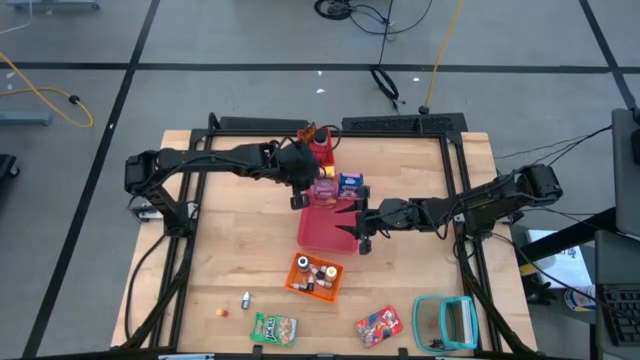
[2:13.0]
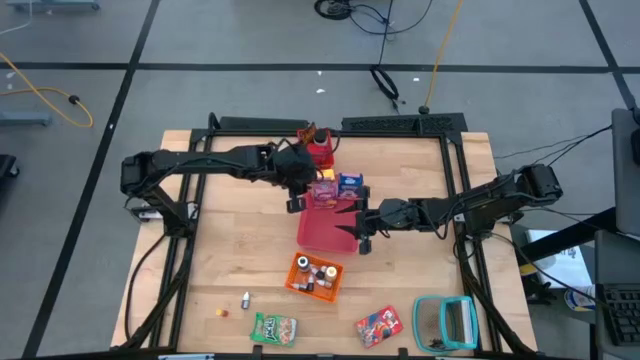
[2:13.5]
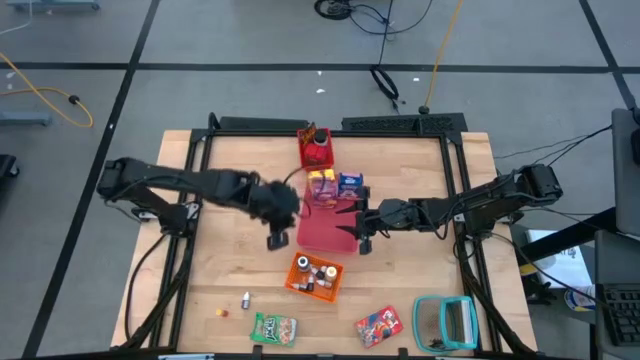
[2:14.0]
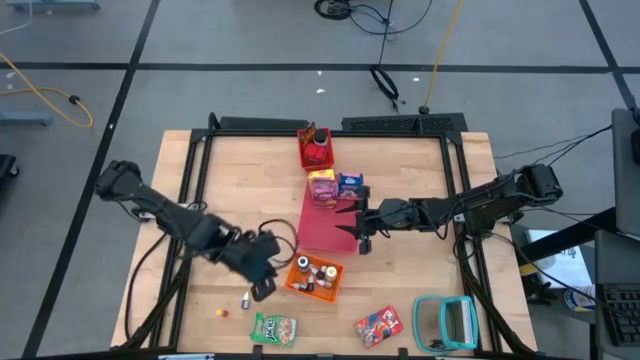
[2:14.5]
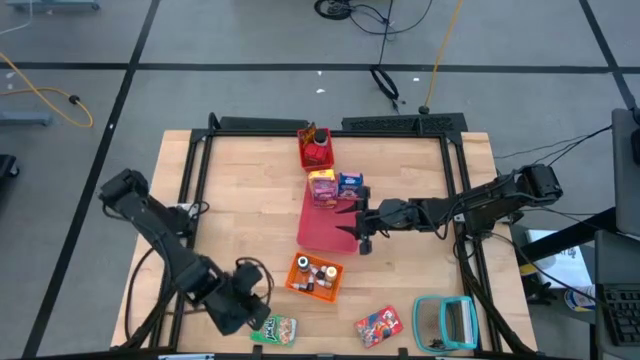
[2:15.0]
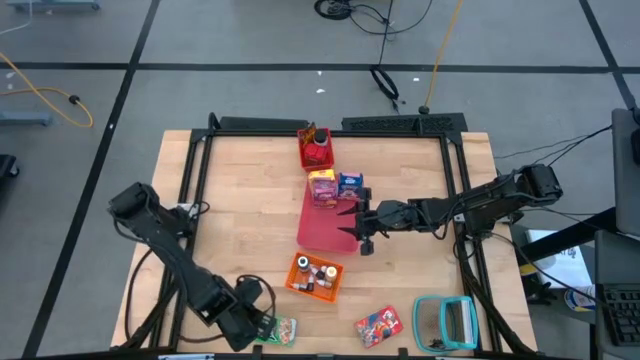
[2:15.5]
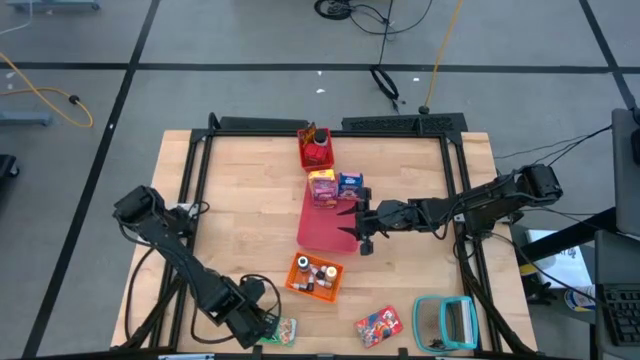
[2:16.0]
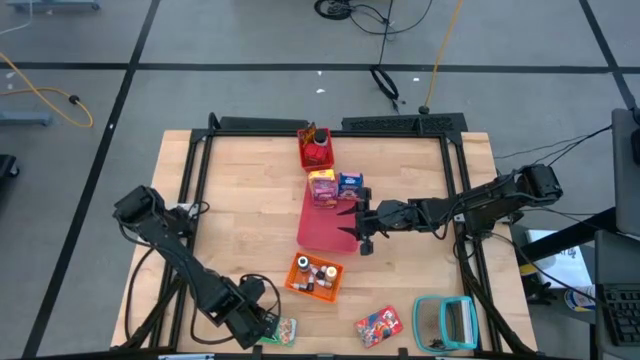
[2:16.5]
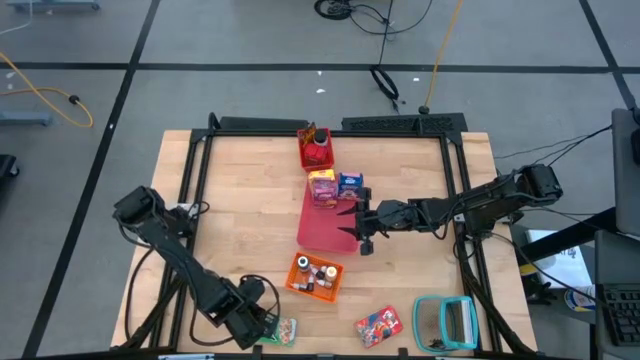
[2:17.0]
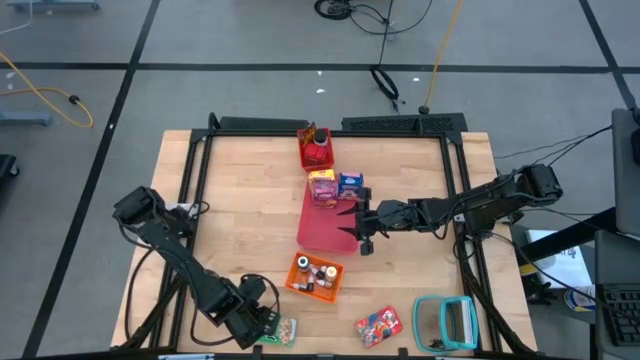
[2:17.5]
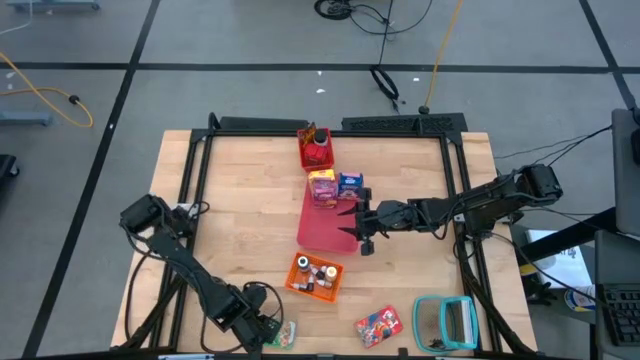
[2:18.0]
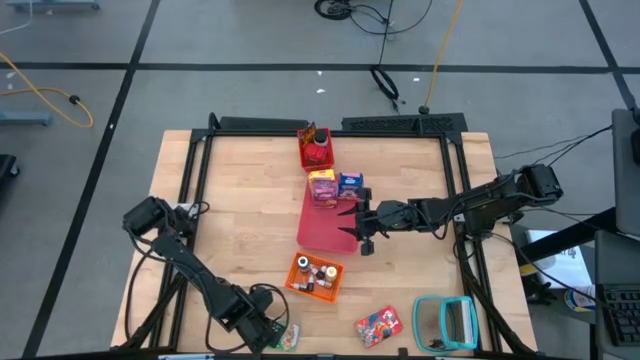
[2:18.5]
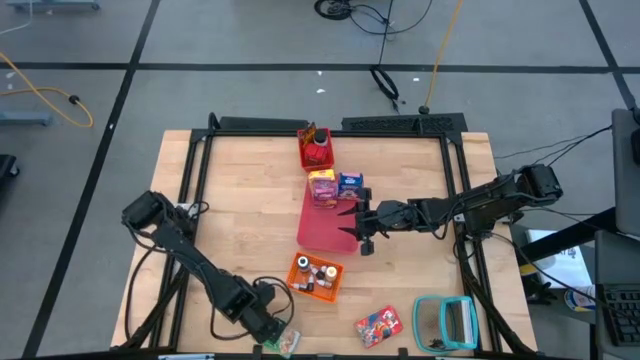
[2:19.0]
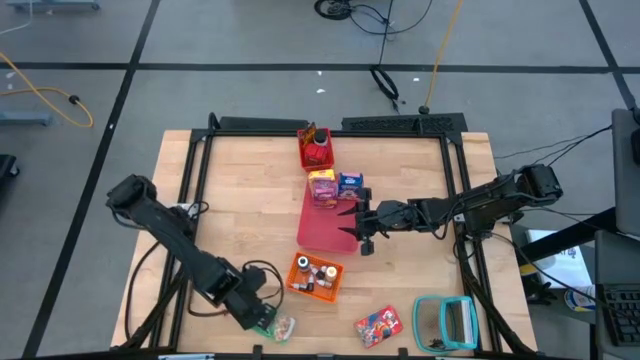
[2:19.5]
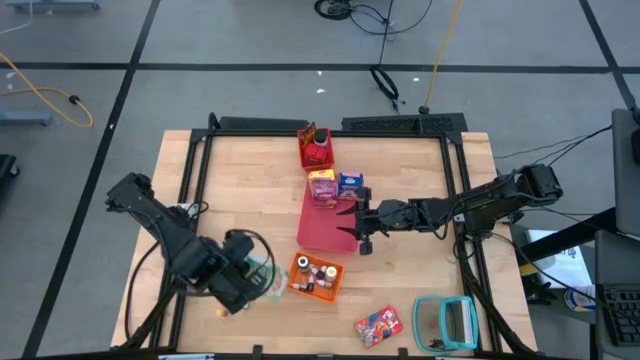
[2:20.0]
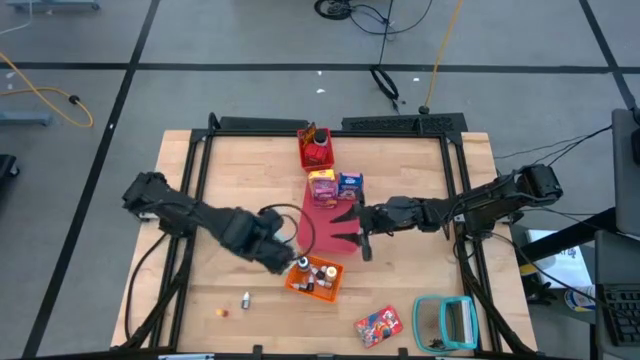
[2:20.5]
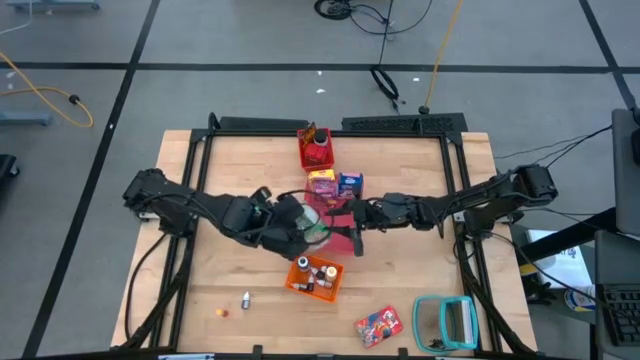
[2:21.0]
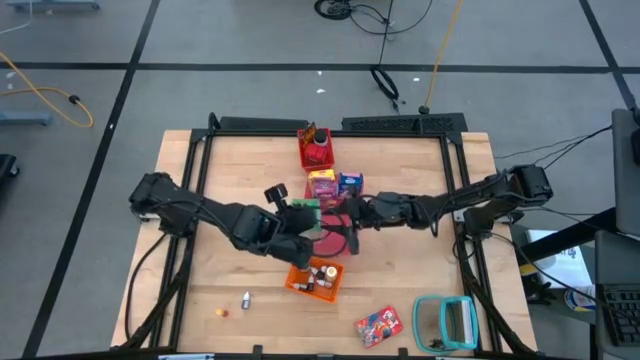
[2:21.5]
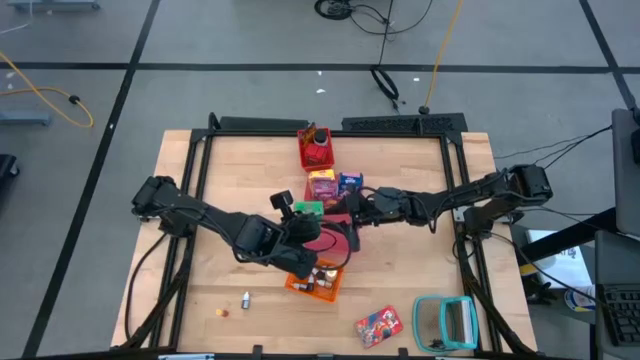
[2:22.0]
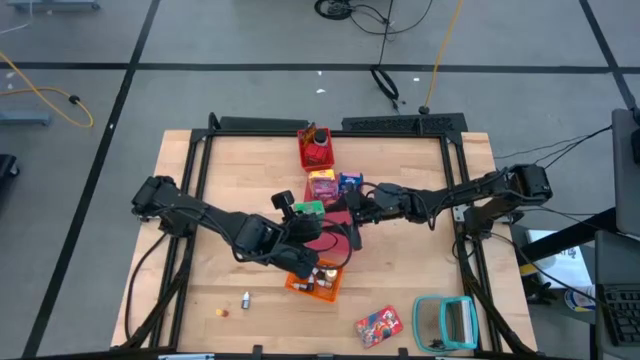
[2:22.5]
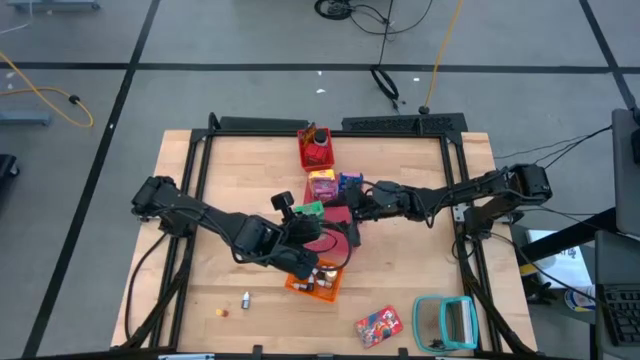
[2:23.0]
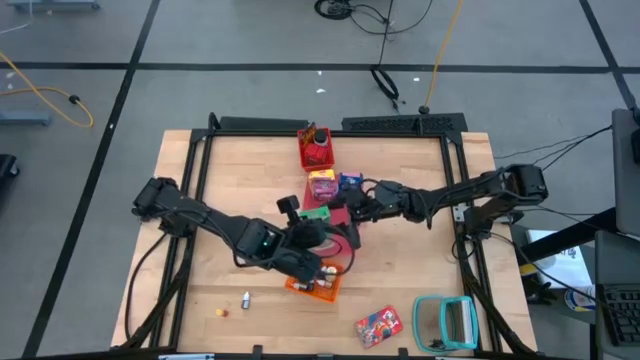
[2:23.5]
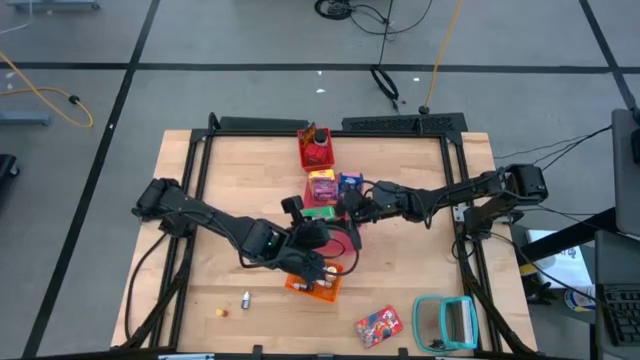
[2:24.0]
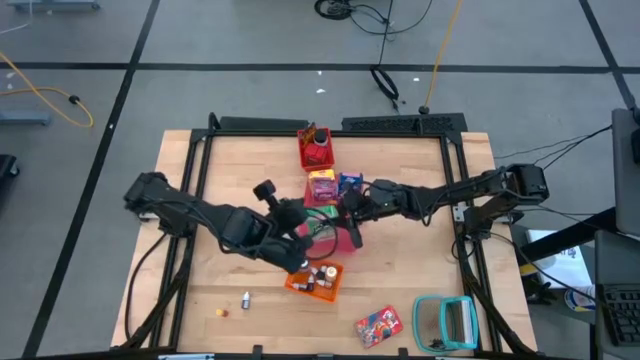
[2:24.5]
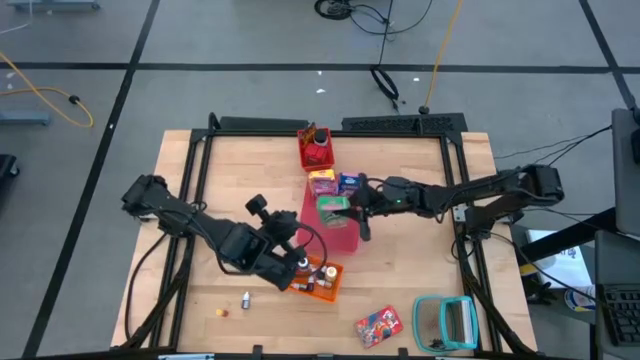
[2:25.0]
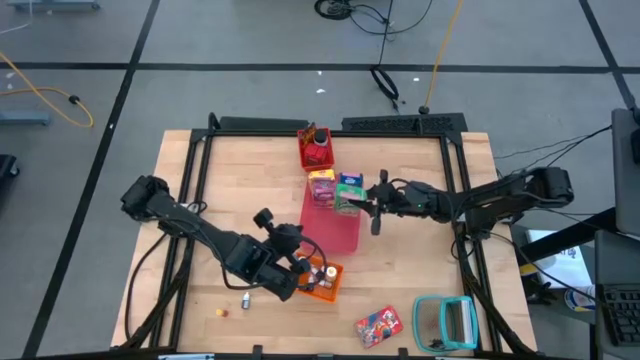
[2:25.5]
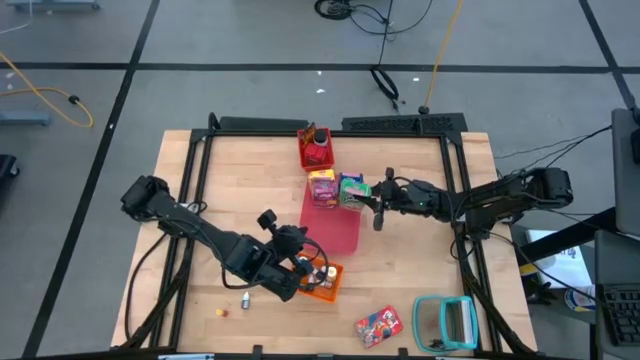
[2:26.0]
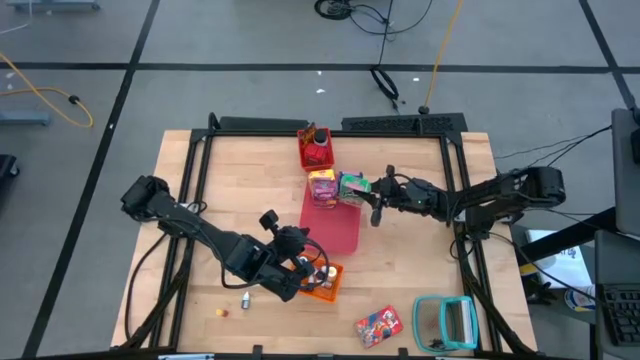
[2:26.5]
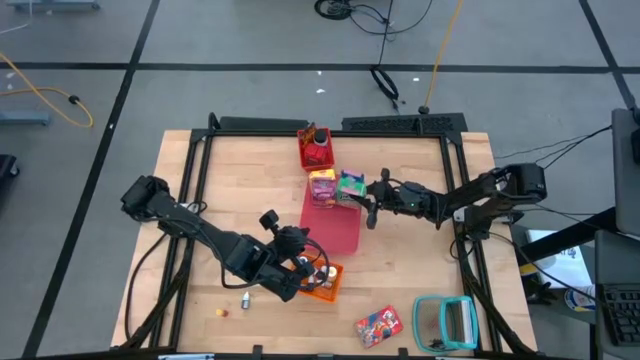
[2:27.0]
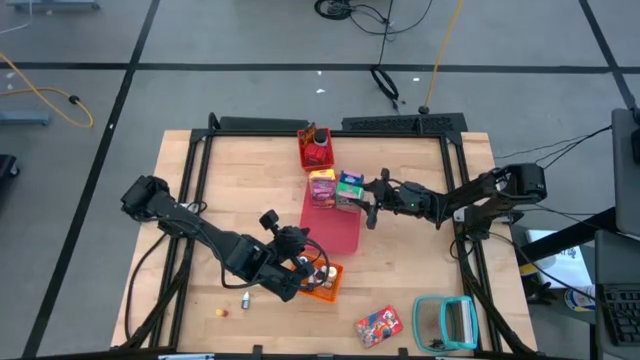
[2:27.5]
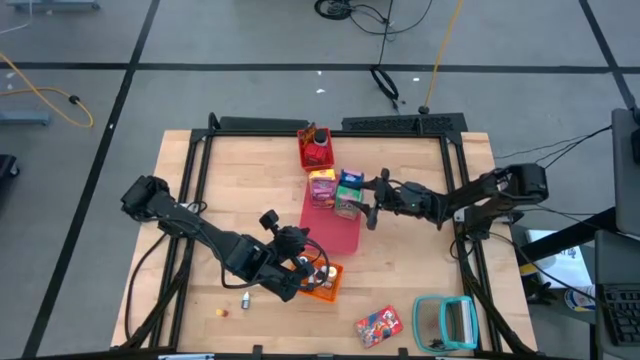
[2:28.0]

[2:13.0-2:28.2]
Task: Pick & Place Kitchen Items
Put the green cereal box into the pink bin

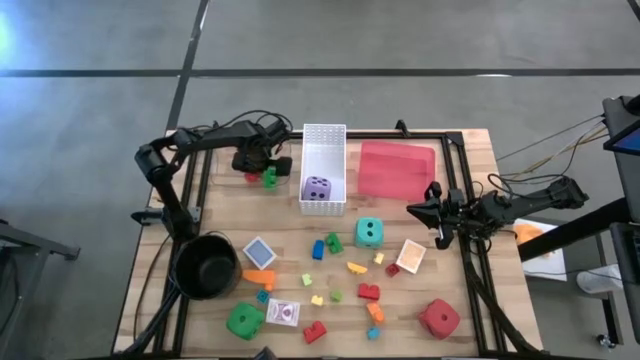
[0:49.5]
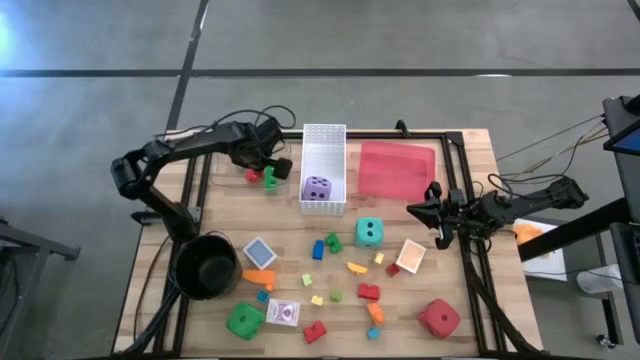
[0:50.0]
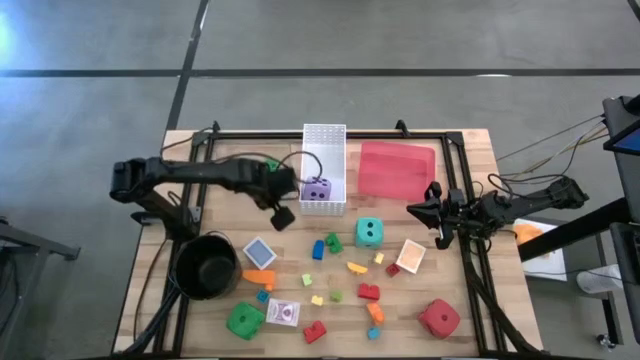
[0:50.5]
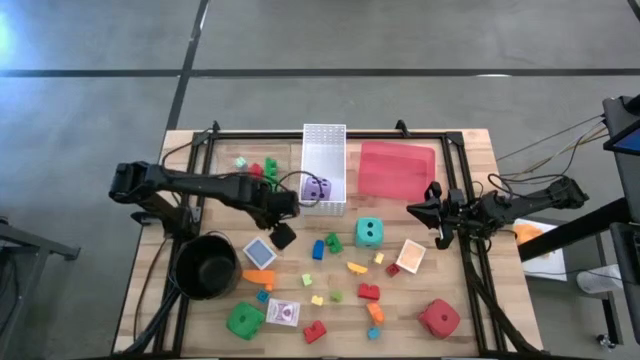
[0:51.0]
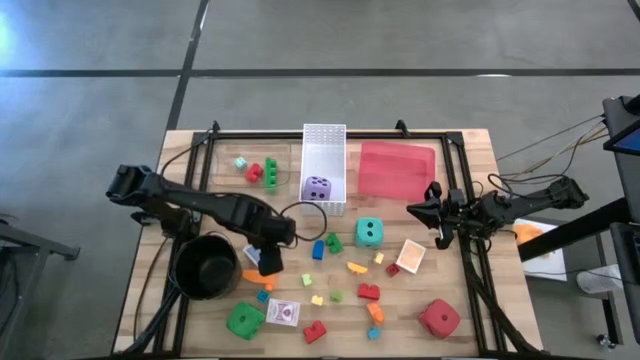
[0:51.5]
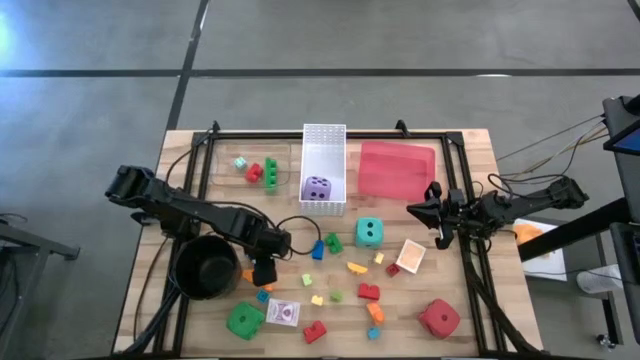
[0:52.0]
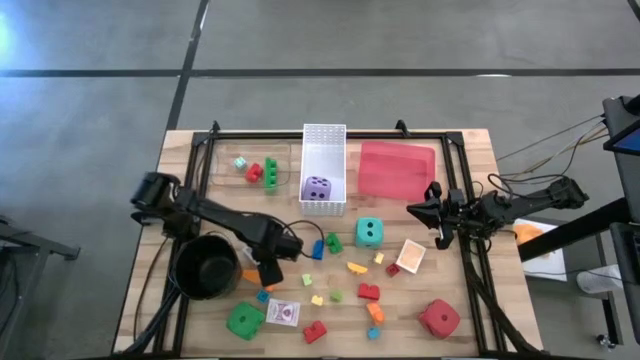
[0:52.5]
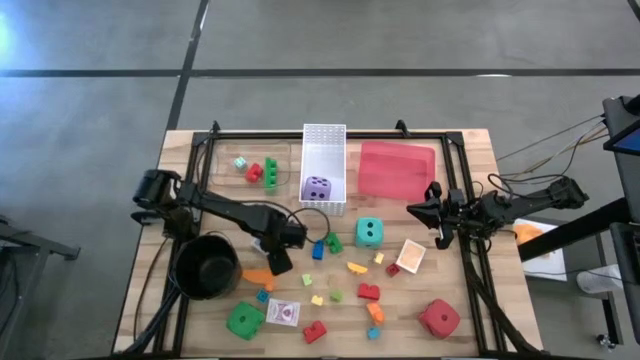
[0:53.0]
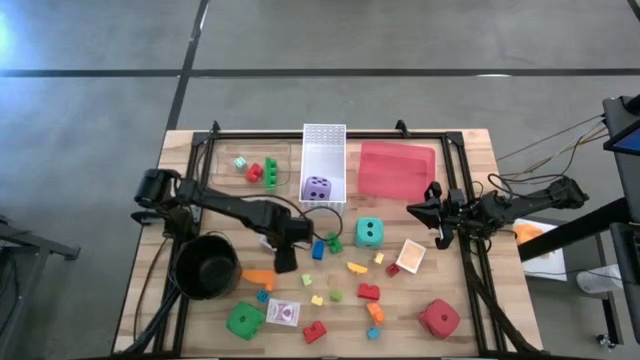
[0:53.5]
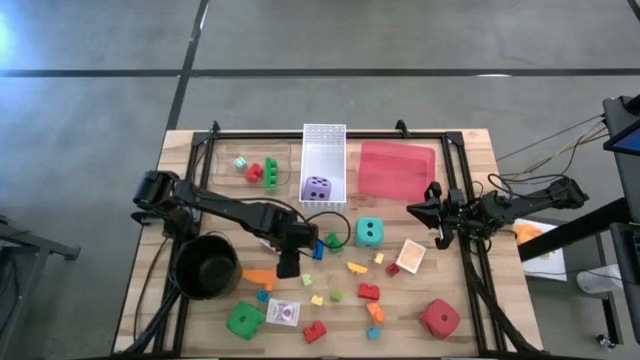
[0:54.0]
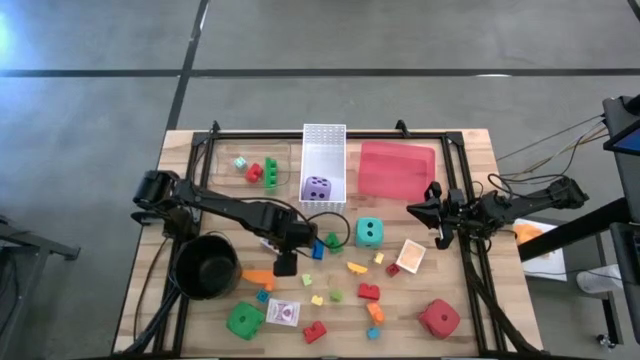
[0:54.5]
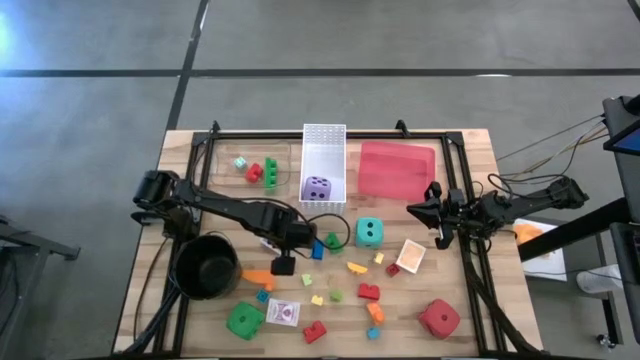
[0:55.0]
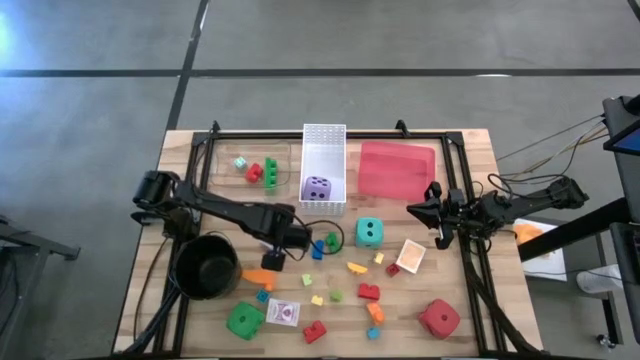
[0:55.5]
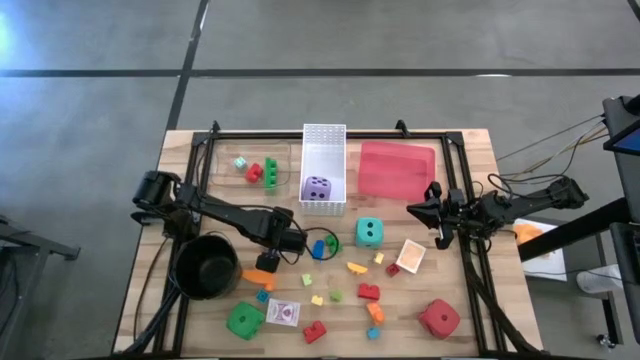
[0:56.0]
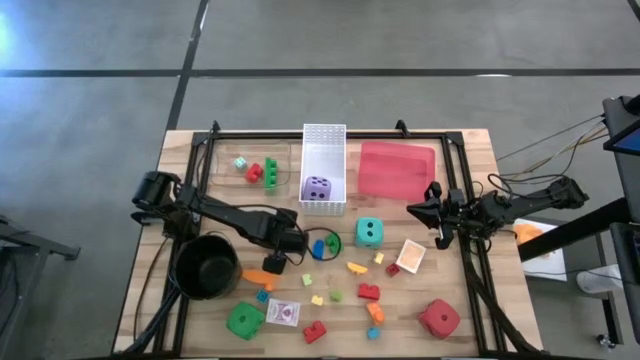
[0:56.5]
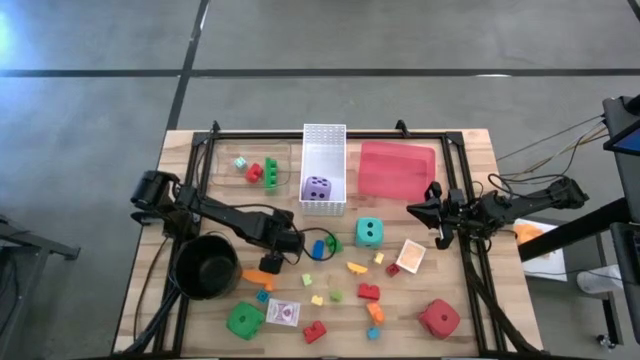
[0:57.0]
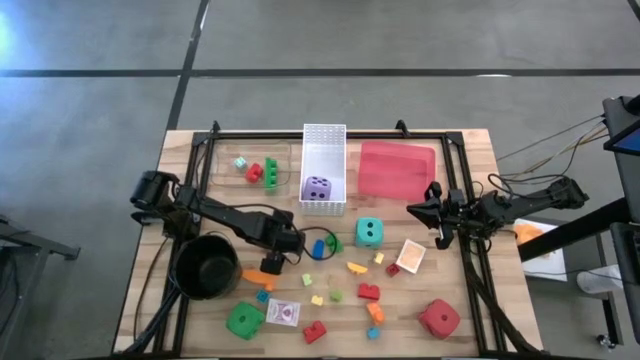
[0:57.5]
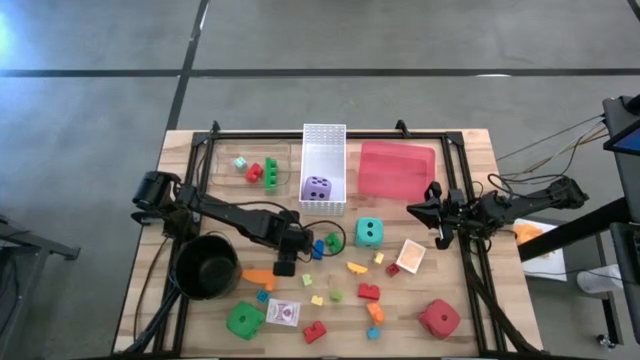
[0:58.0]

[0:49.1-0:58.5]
Task: Pick & Place Toys
Put the blue deck of cards into the red bin
